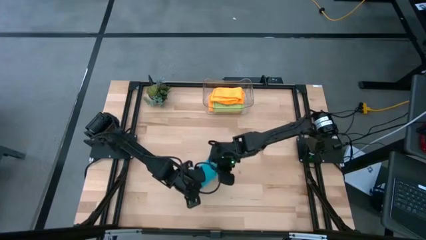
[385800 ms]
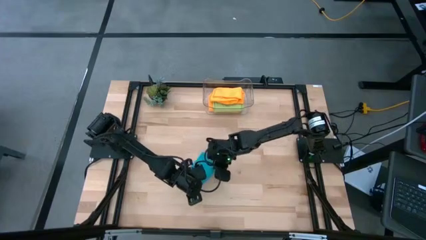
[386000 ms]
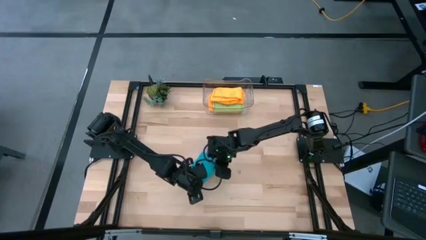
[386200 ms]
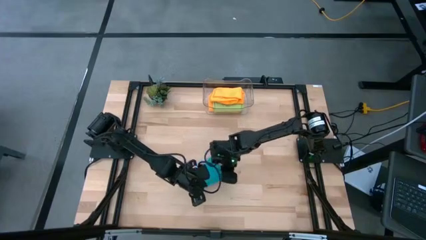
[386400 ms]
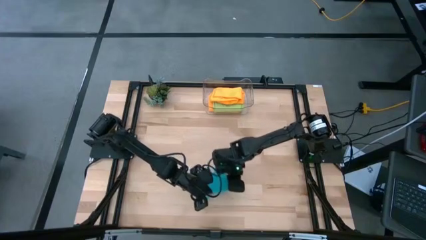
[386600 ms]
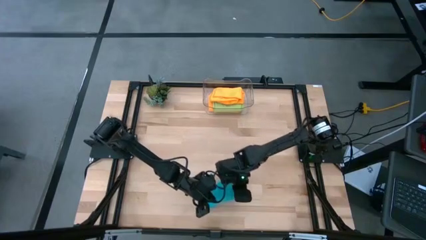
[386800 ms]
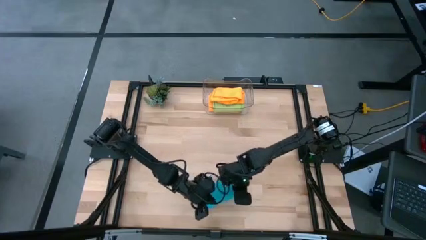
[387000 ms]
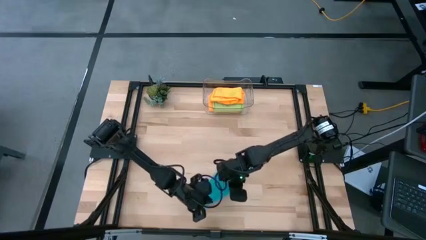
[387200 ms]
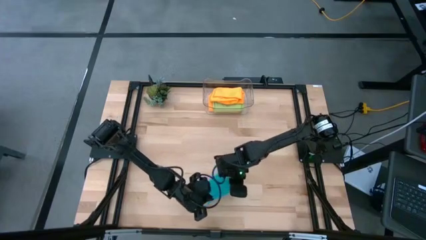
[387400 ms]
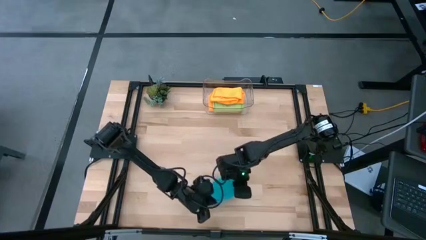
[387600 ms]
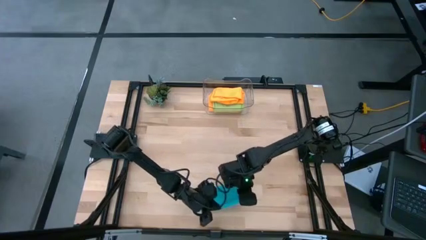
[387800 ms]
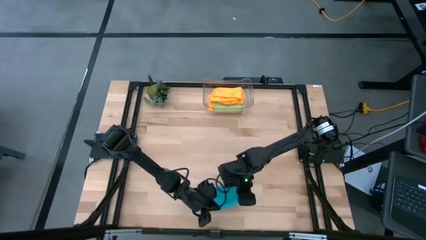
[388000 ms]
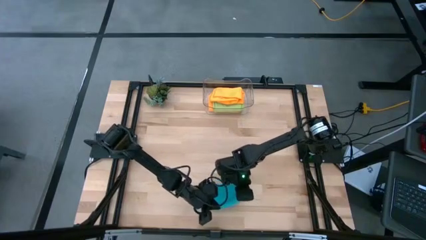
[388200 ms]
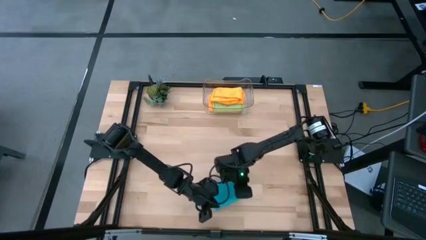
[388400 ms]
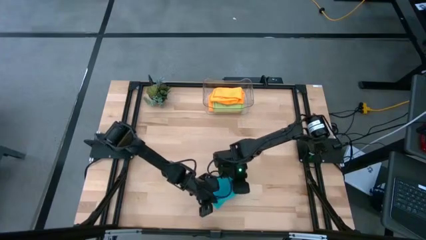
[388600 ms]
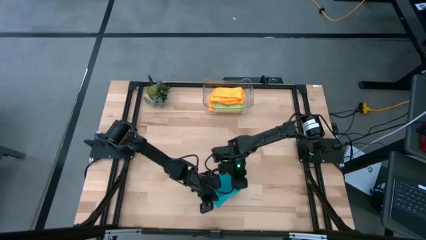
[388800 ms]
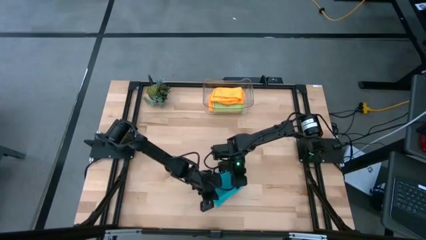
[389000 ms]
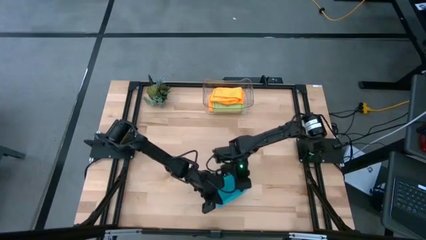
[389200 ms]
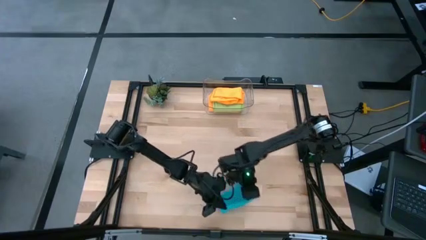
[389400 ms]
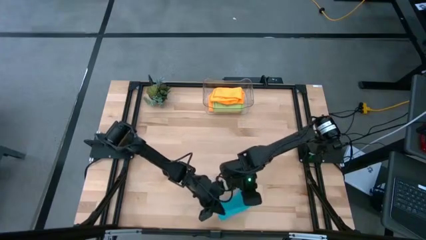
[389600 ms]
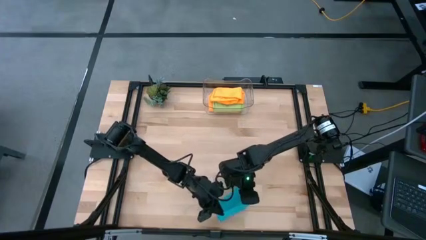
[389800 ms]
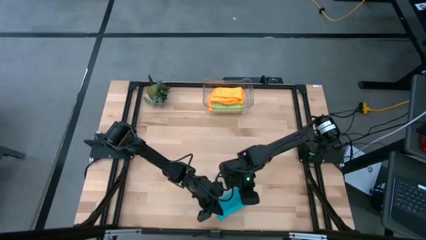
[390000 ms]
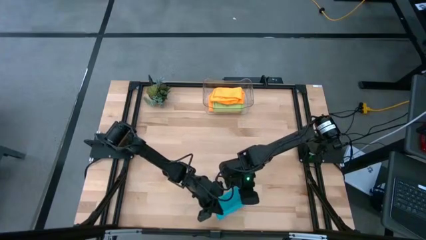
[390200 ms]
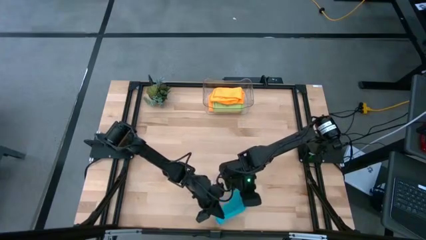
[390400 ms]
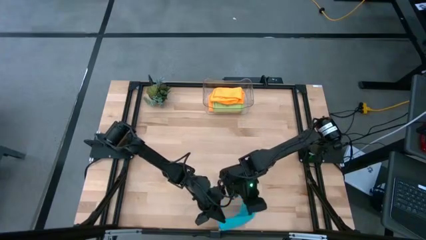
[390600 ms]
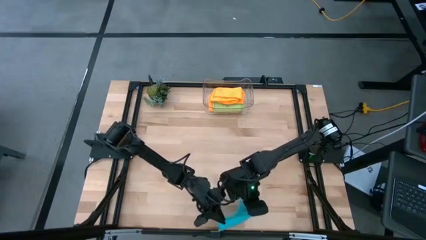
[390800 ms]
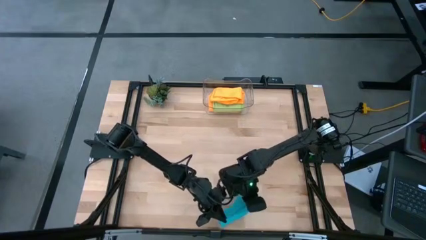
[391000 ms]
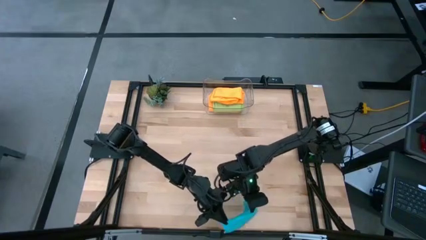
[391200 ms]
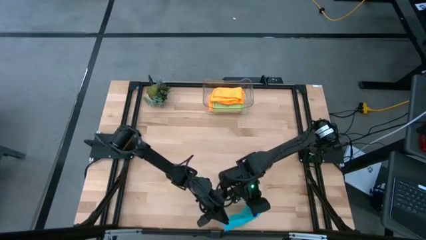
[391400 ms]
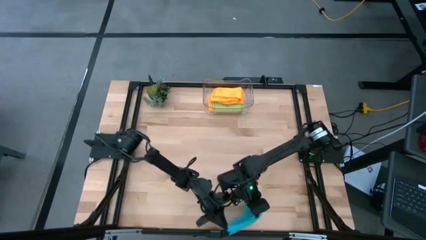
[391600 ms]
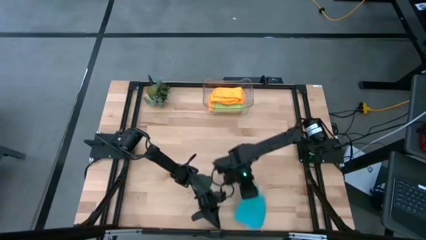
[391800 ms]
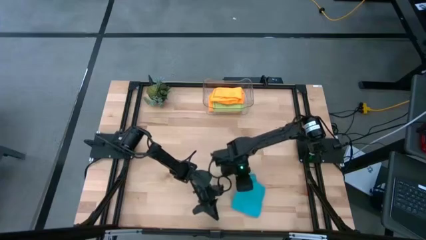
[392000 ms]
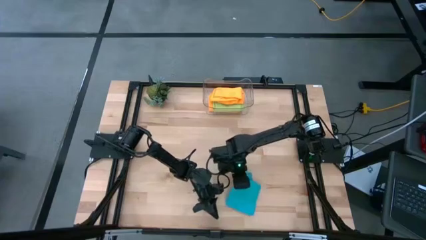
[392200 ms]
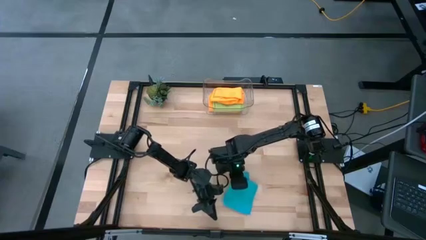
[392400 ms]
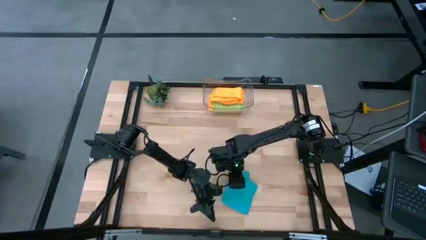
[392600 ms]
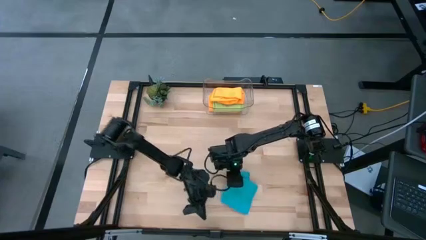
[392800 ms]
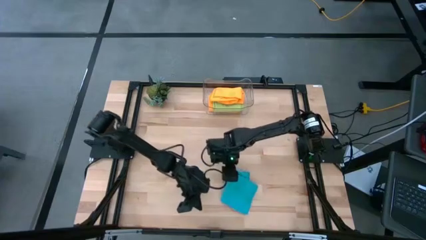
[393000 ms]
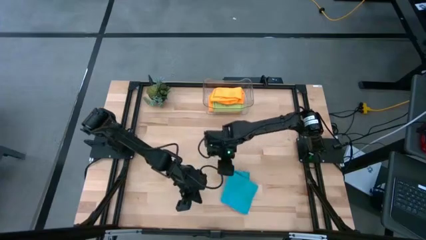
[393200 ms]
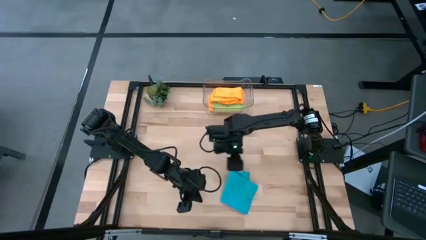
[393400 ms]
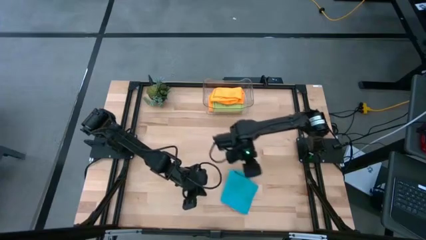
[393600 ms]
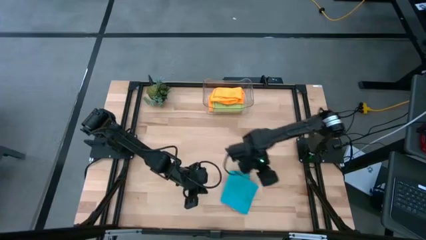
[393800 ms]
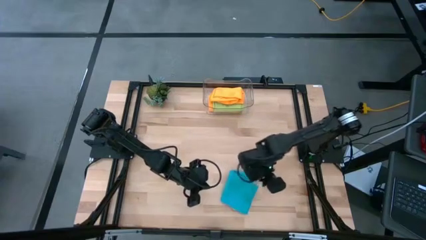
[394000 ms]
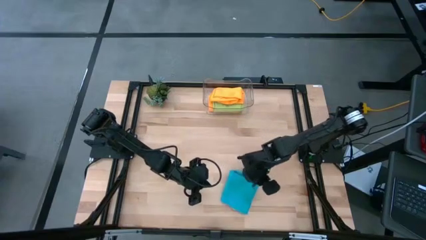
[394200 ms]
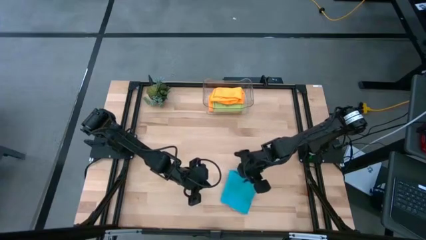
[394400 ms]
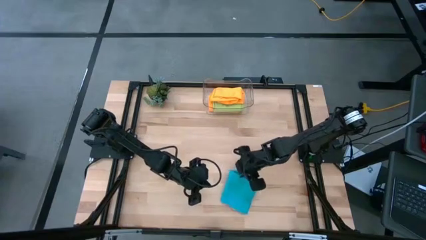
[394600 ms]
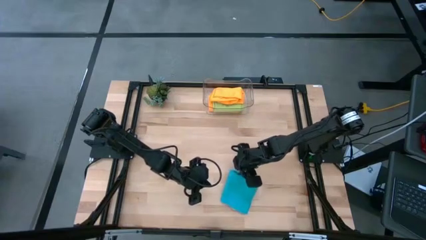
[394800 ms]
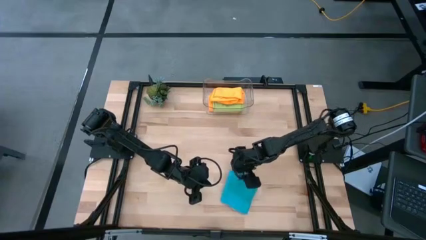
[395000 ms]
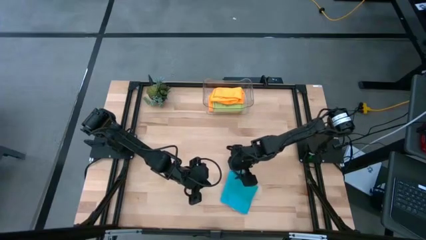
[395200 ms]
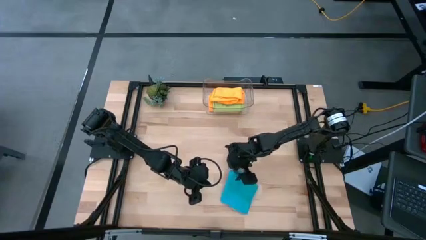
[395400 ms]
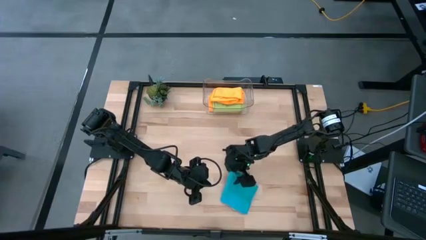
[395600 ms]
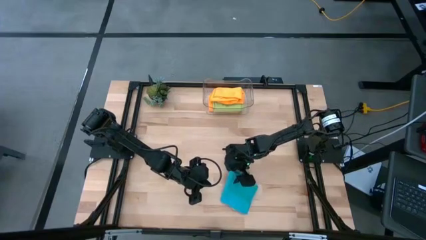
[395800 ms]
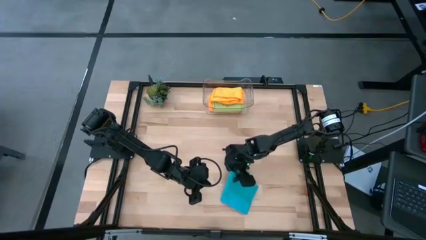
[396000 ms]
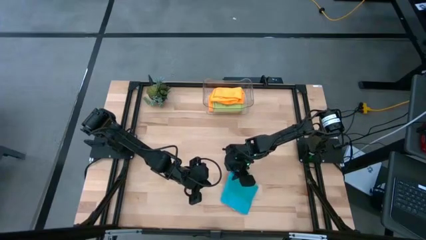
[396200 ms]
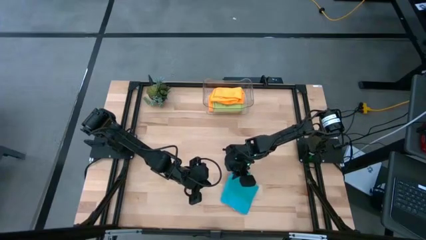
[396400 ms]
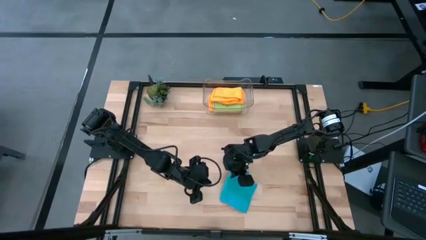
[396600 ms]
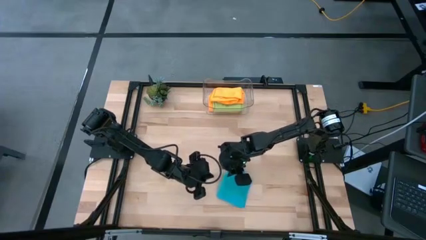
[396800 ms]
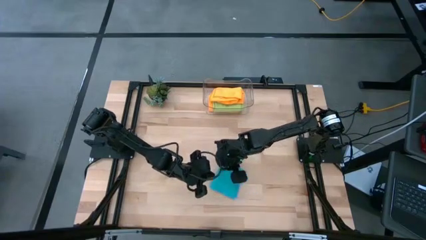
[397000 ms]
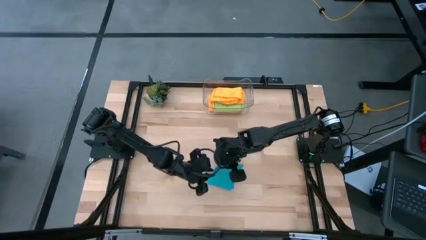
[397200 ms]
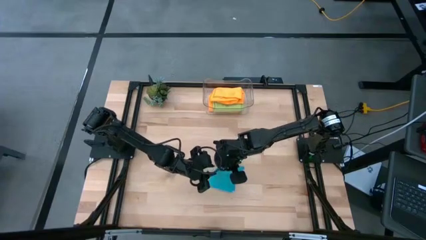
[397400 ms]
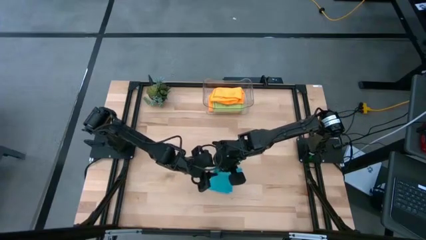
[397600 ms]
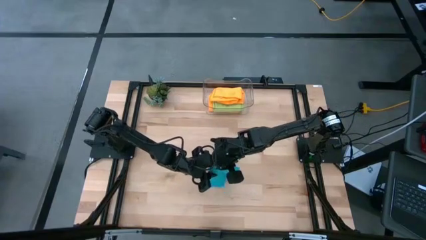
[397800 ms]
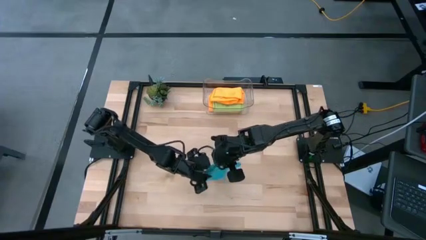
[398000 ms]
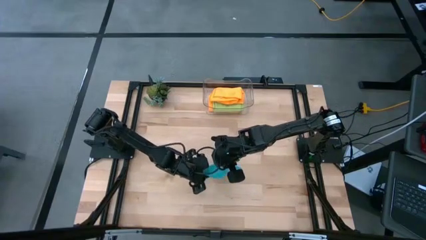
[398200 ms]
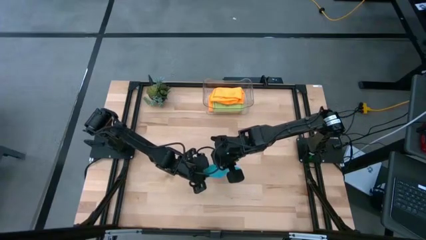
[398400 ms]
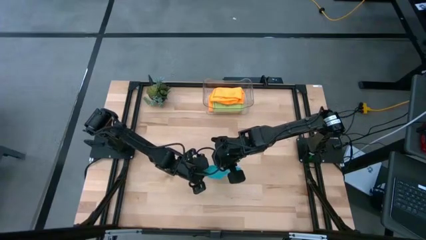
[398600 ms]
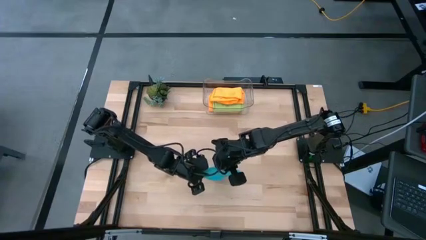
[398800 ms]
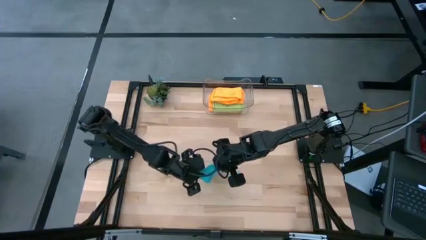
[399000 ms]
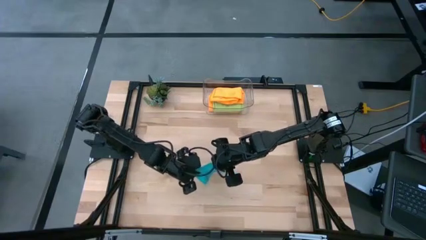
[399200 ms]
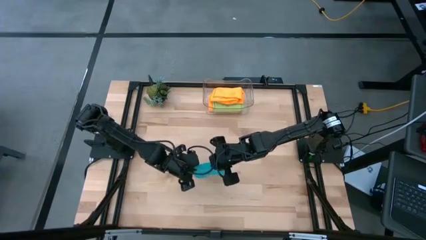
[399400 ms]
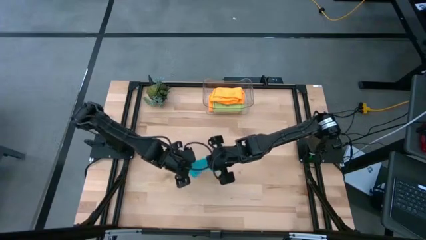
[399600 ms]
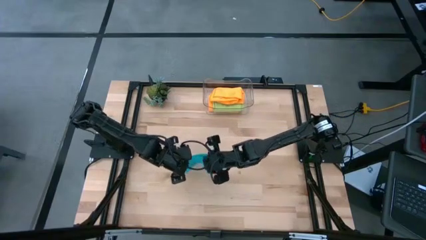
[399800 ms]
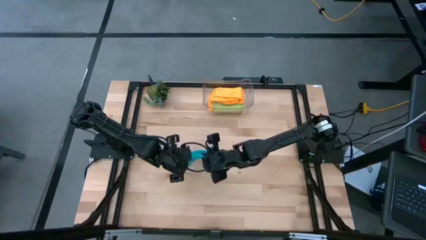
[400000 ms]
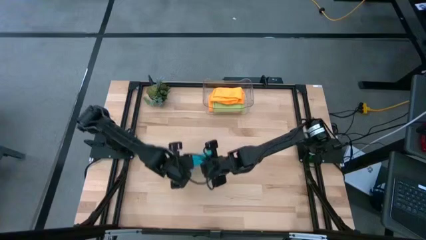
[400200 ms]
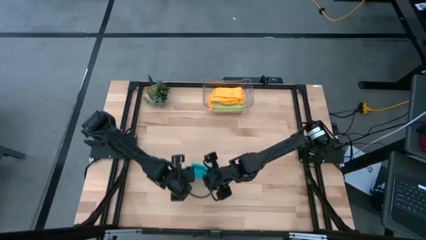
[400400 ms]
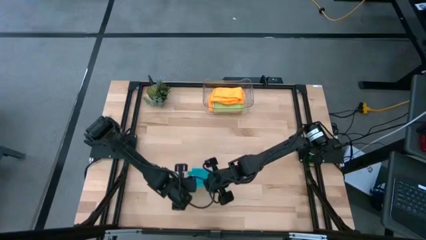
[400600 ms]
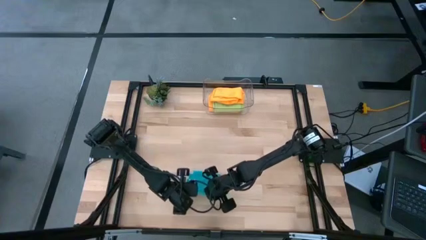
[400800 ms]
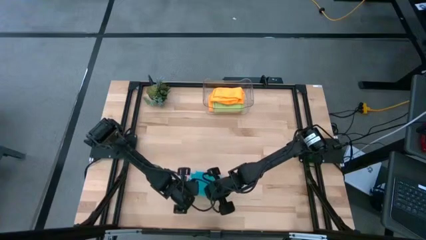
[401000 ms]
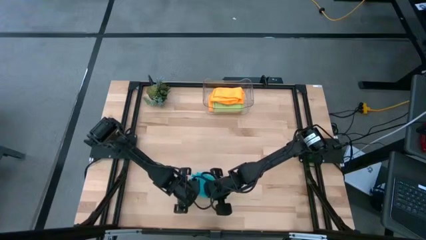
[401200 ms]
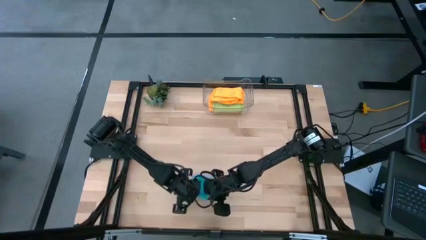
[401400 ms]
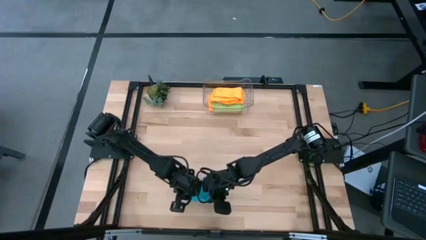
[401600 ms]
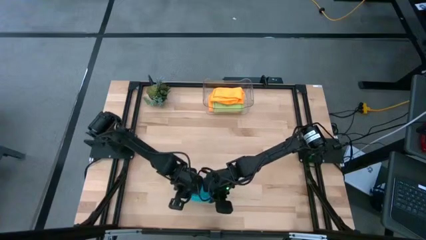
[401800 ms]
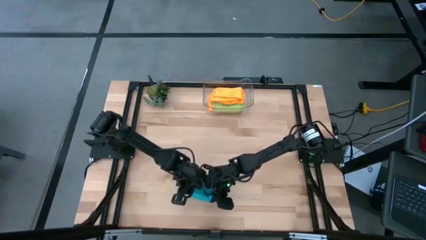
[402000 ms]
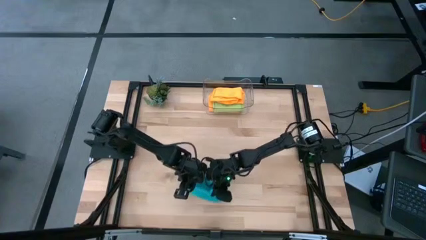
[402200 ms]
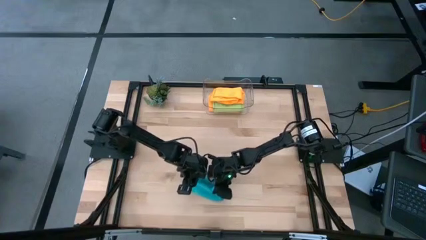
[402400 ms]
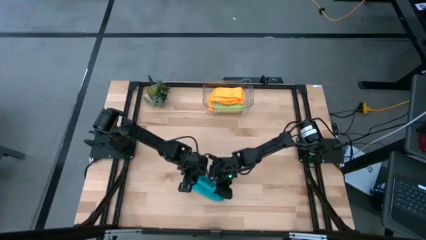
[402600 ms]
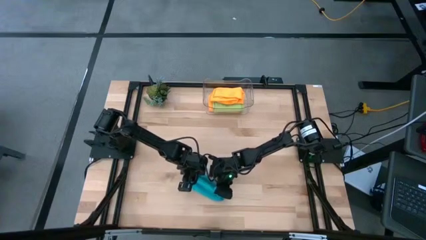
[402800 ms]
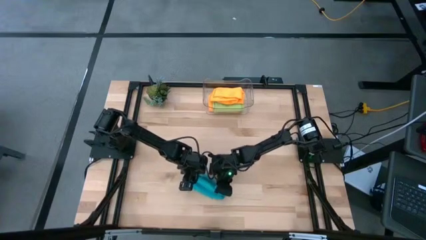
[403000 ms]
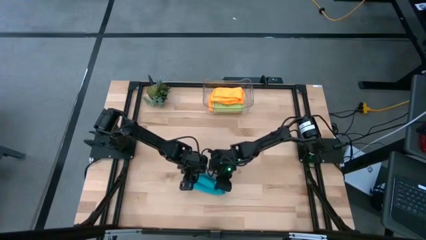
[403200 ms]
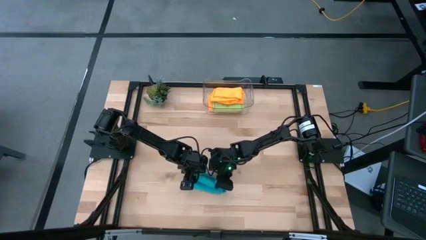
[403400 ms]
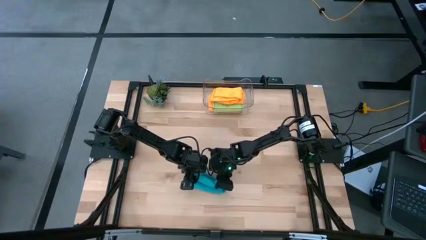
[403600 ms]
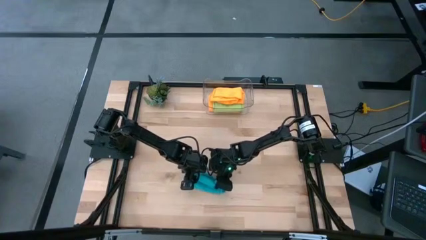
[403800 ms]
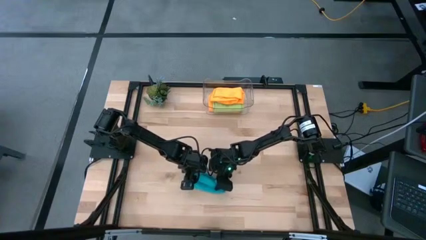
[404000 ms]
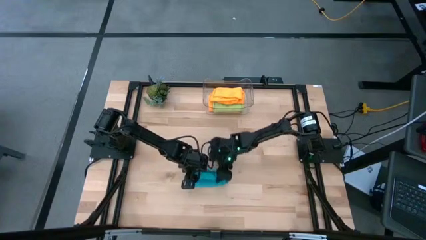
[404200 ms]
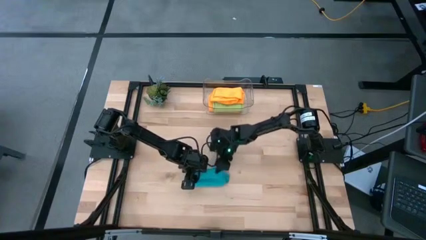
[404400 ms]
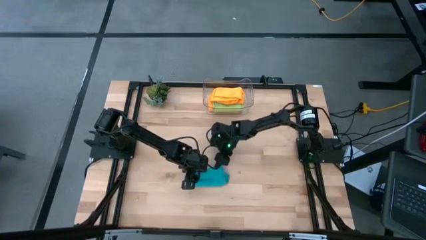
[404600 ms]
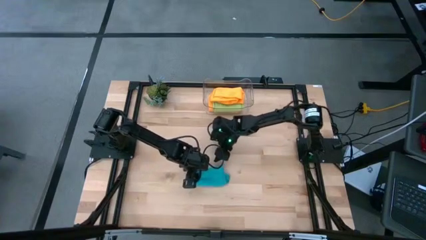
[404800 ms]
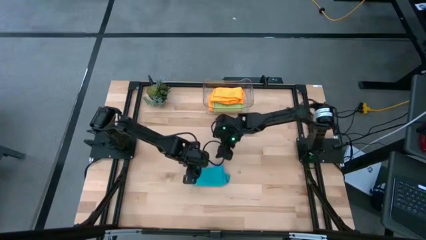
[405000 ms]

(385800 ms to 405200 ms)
Task: Fold microfiber towels
Fold the blue microfiber cloth
